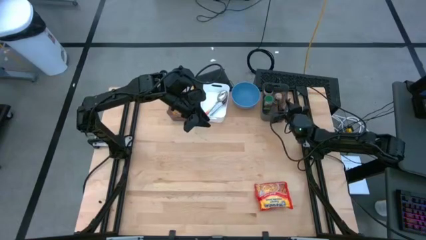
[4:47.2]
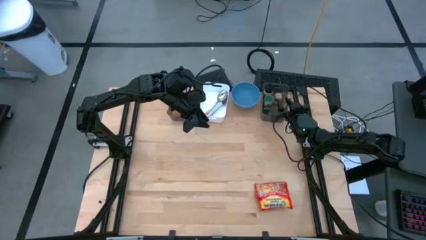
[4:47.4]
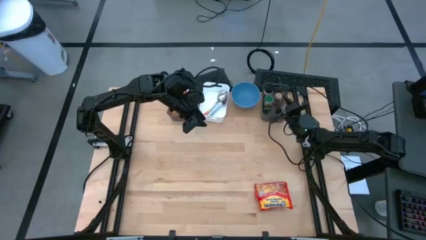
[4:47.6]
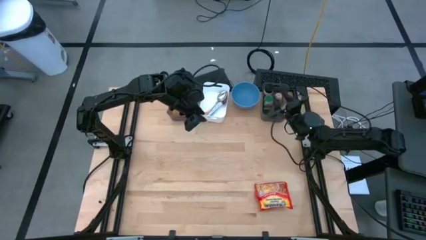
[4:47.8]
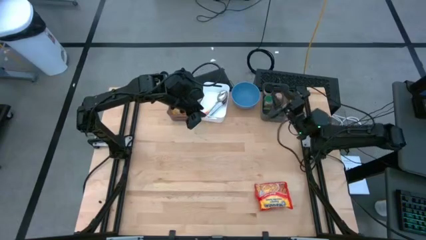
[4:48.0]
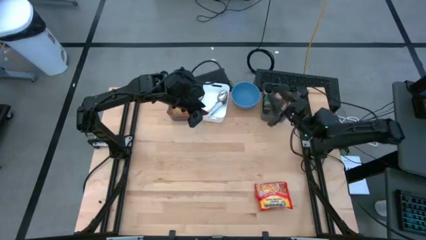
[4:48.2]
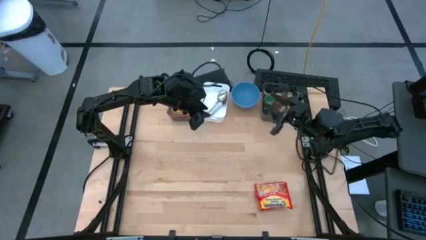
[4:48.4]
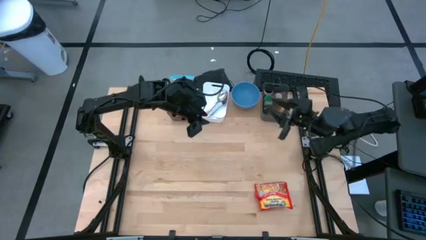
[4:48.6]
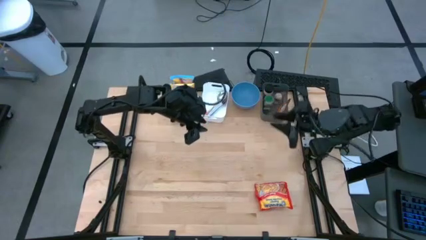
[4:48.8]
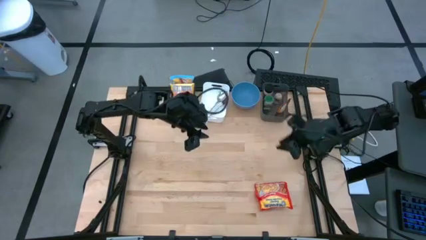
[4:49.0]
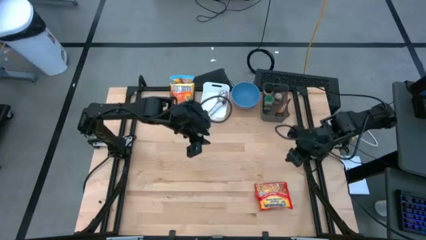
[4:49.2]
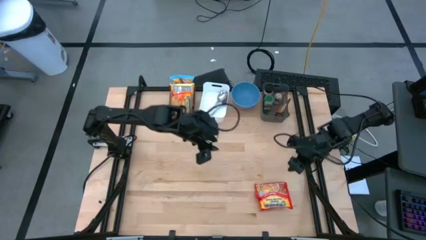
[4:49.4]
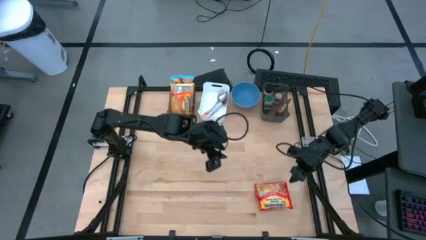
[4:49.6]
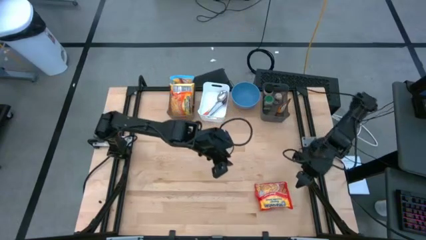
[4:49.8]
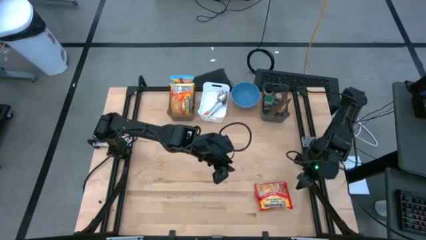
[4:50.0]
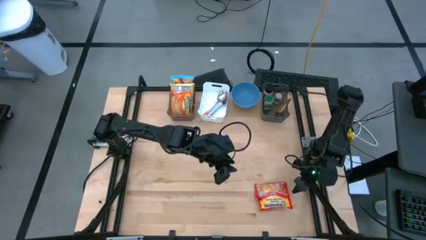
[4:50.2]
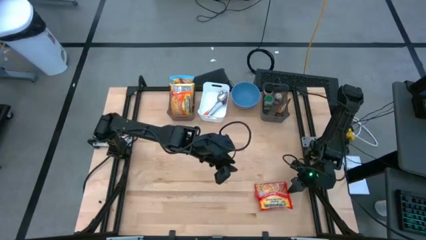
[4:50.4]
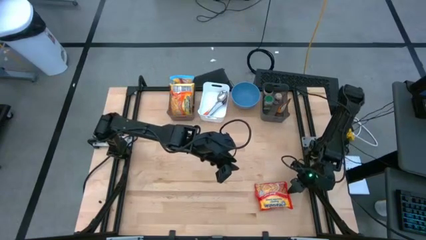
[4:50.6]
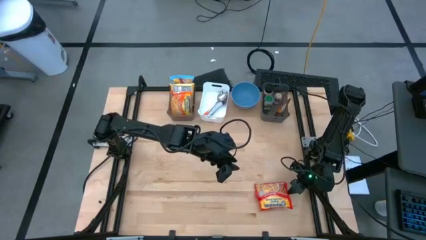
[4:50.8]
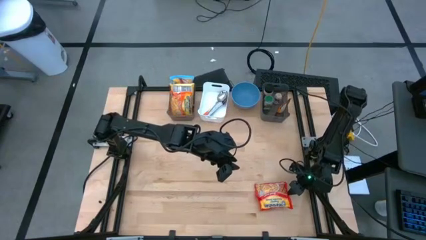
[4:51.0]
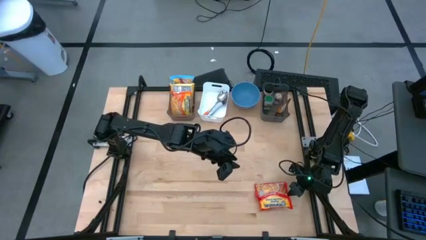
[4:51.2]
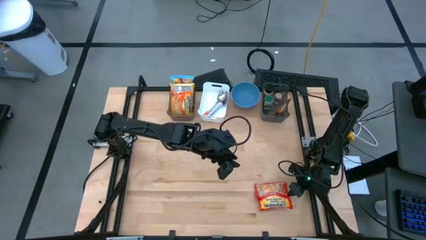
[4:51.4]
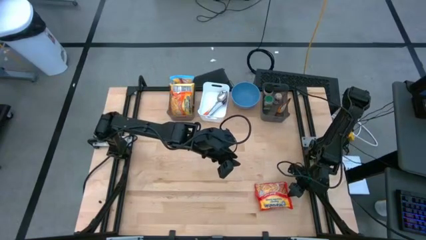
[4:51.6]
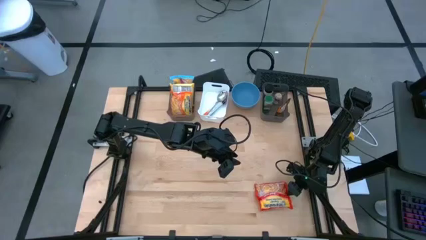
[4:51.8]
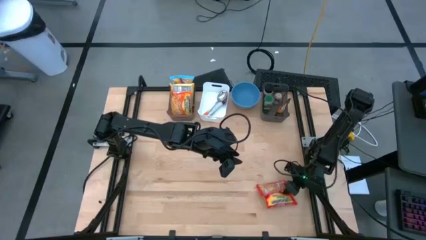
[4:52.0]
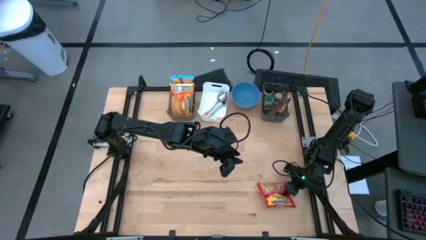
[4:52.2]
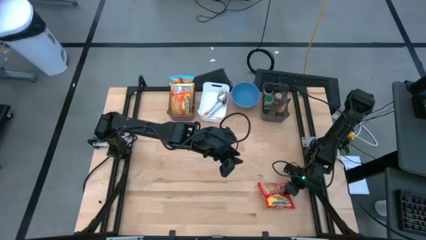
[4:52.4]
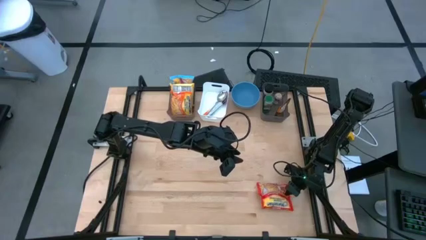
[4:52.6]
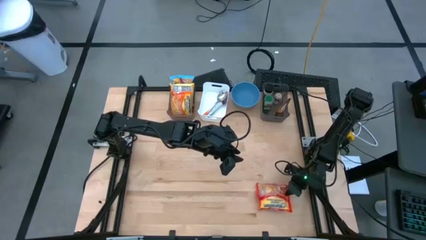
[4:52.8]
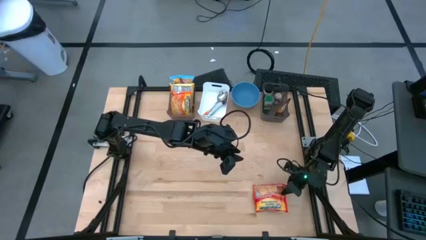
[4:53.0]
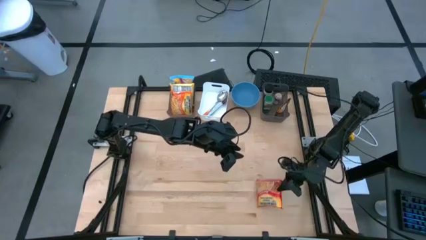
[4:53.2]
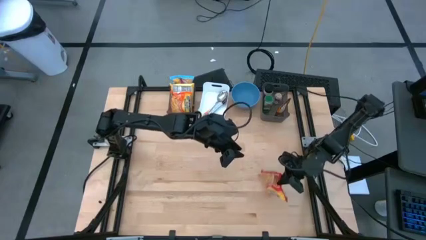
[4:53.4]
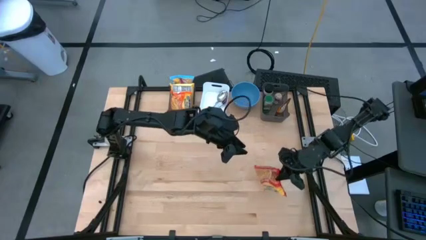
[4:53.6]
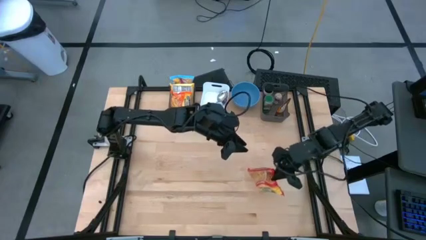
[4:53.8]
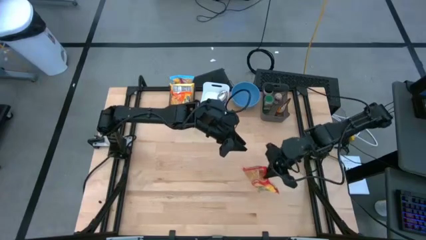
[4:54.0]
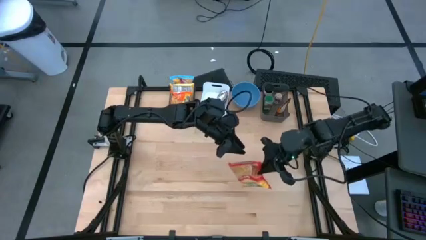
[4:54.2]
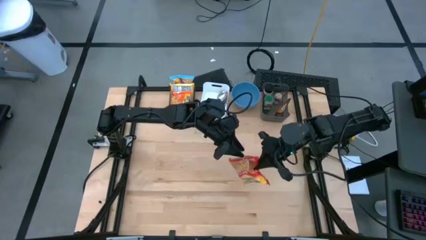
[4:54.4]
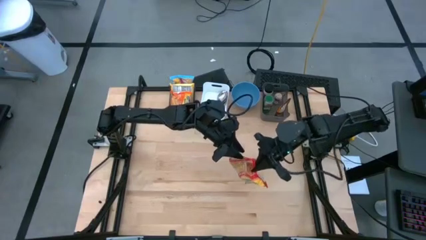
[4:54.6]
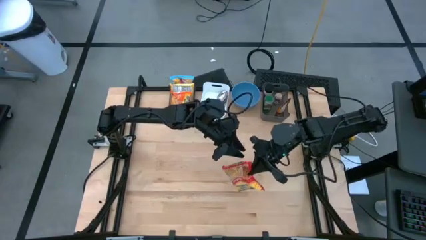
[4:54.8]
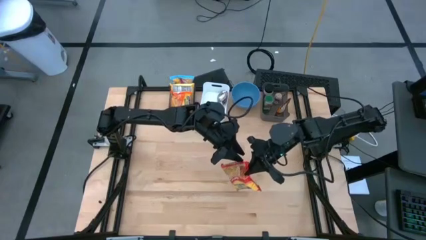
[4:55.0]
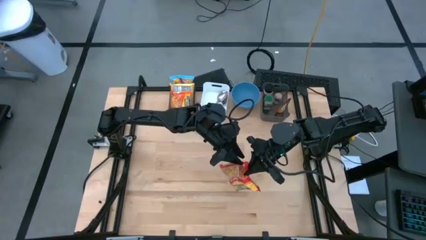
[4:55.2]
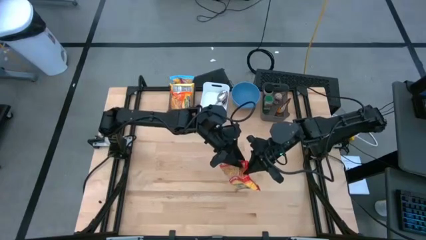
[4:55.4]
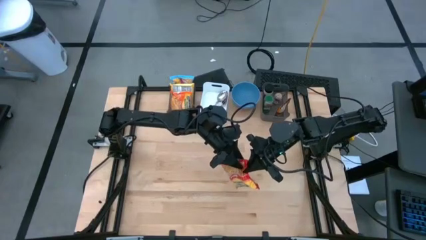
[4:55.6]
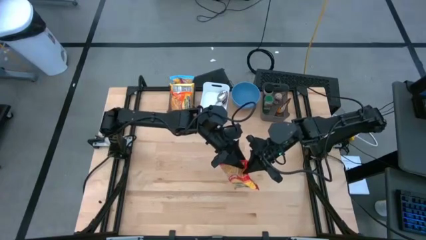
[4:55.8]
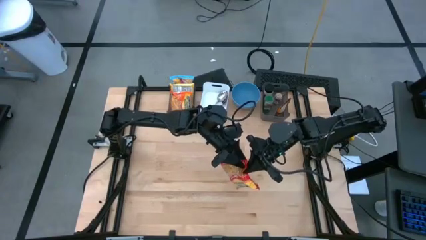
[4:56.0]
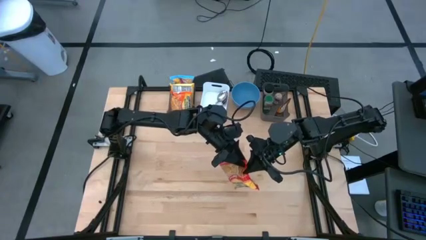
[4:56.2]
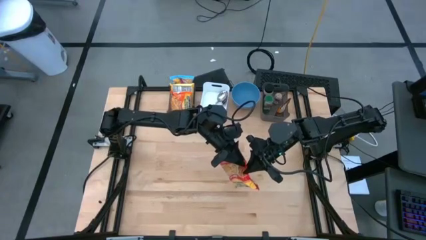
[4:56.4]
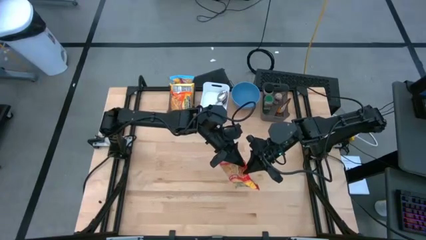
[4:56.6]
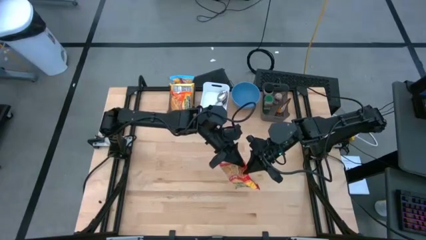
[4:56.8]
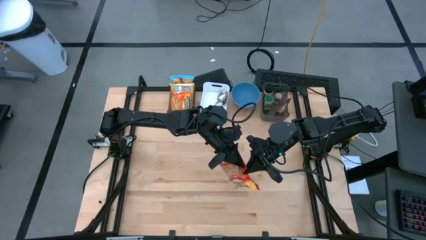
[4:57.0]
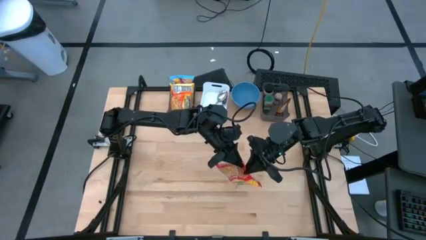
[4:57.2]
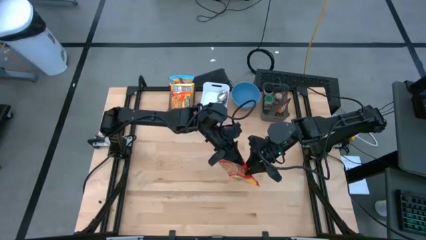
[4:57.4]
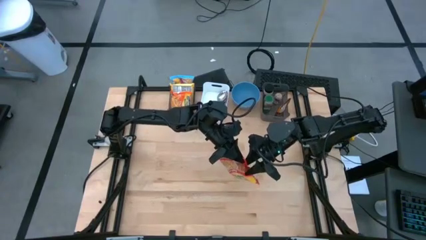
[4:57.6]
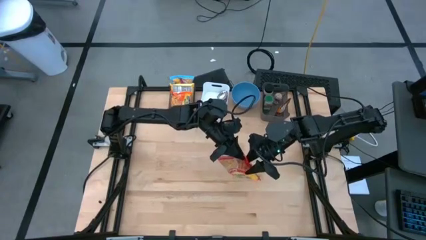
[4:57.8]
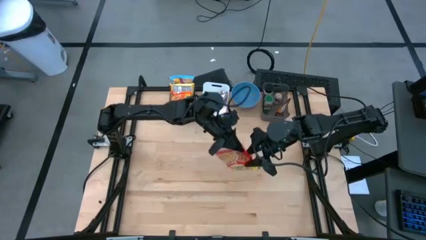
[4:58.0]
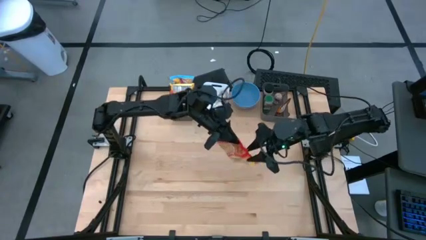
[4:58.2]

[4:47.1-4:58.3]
Task: Pick & Place Food Item
Put the red noodle pack into the left black bin

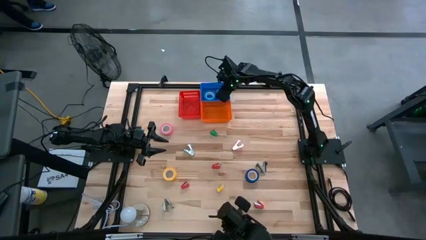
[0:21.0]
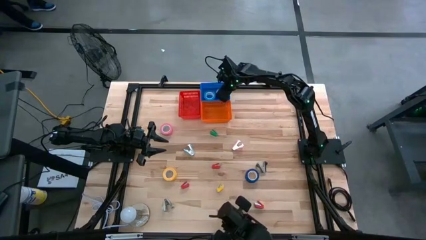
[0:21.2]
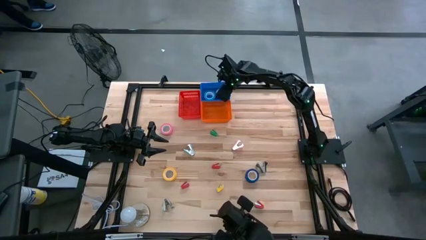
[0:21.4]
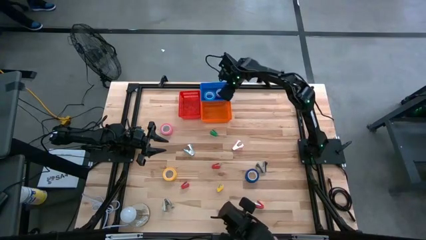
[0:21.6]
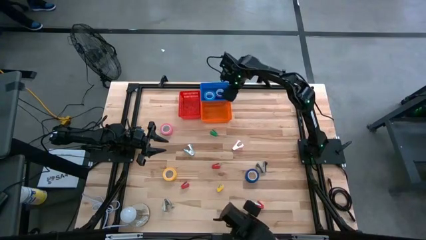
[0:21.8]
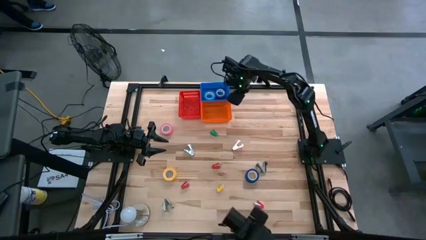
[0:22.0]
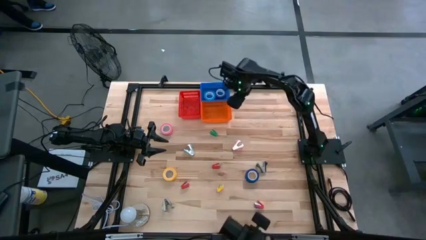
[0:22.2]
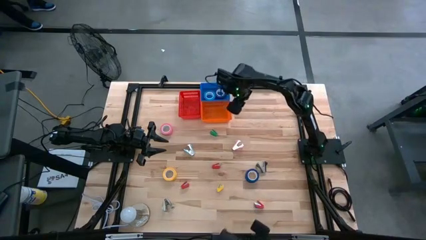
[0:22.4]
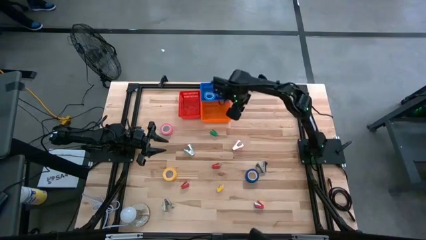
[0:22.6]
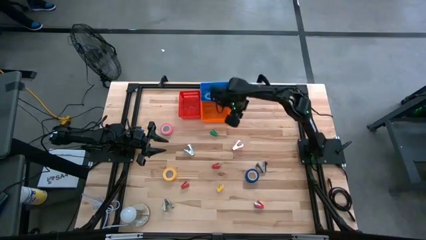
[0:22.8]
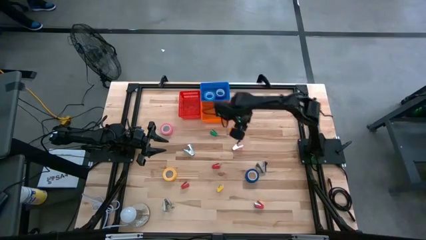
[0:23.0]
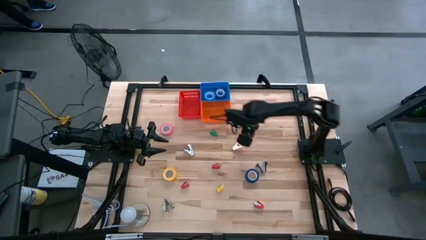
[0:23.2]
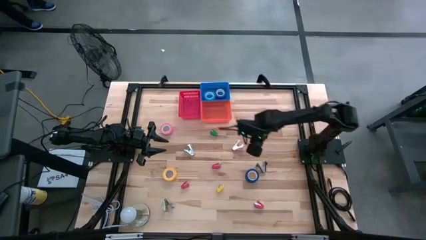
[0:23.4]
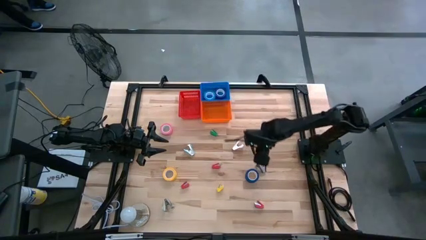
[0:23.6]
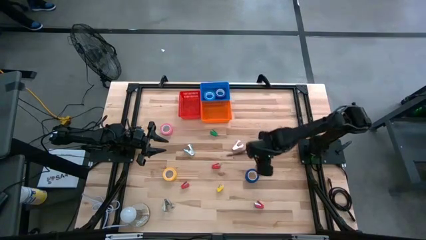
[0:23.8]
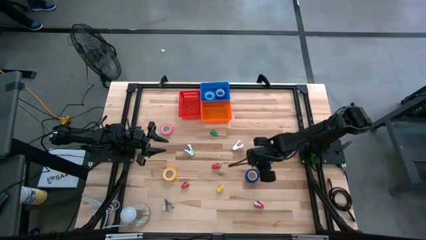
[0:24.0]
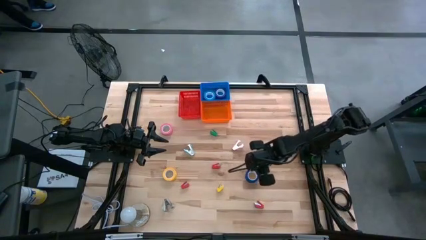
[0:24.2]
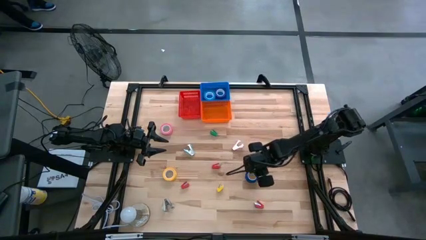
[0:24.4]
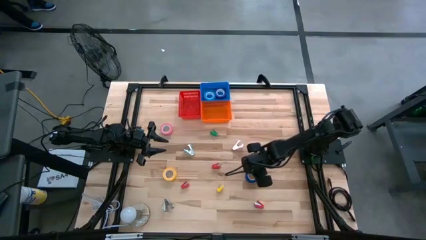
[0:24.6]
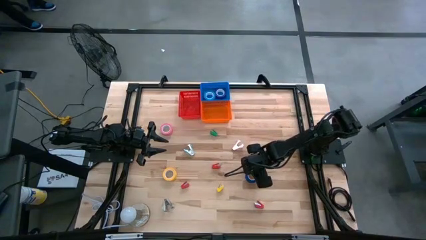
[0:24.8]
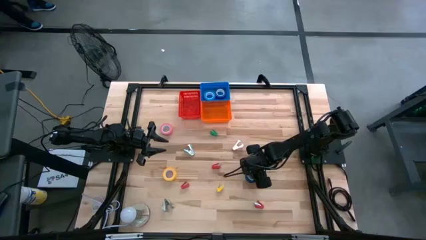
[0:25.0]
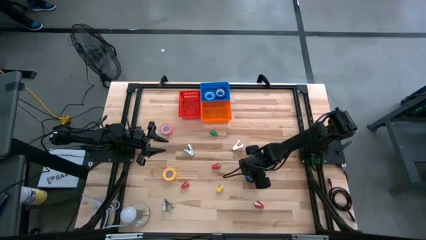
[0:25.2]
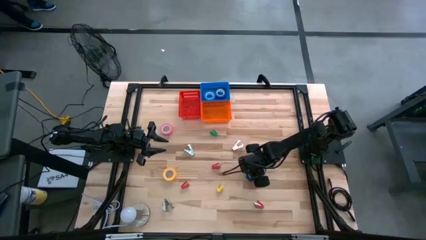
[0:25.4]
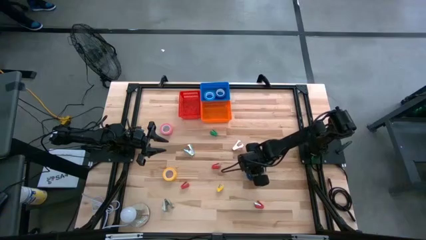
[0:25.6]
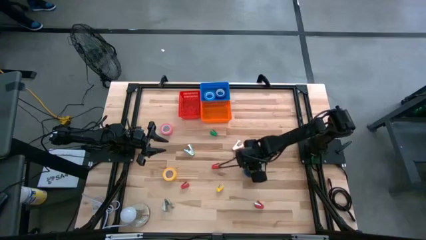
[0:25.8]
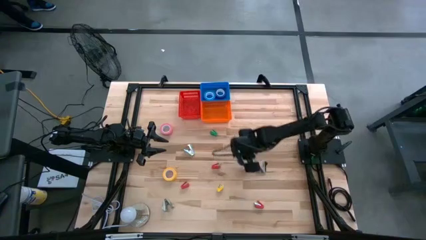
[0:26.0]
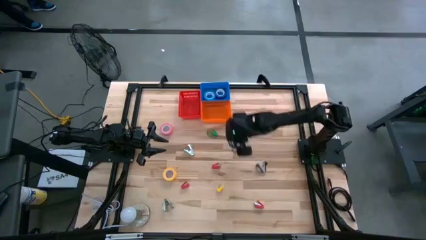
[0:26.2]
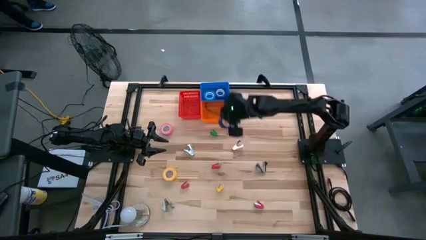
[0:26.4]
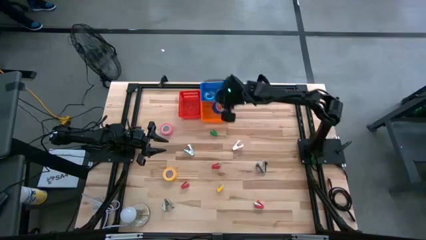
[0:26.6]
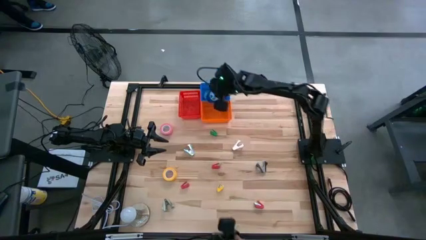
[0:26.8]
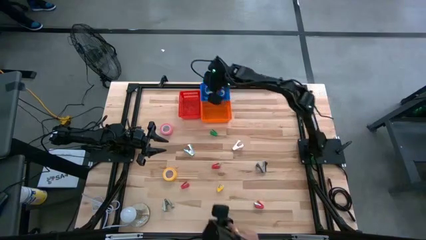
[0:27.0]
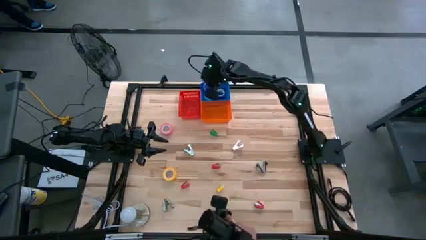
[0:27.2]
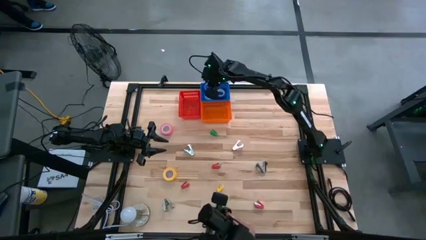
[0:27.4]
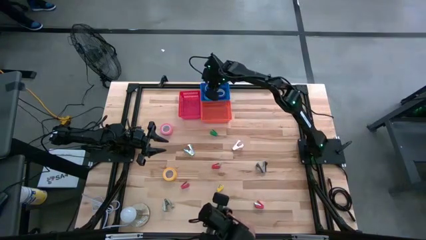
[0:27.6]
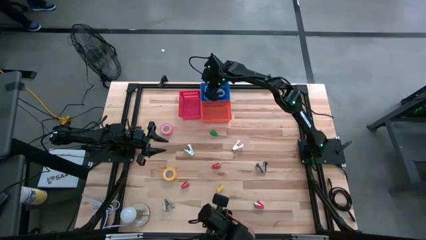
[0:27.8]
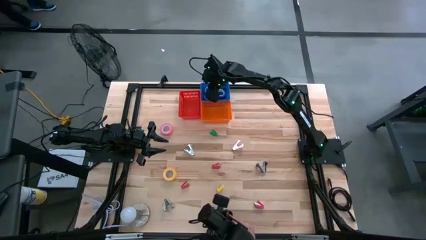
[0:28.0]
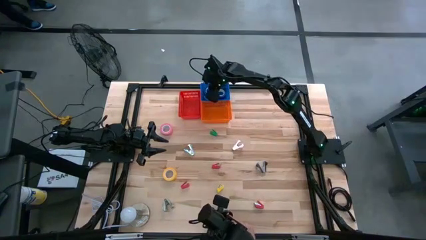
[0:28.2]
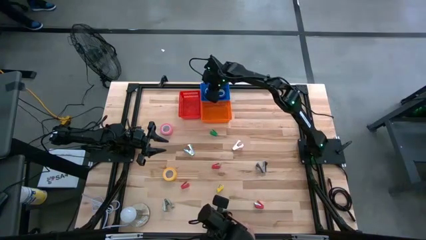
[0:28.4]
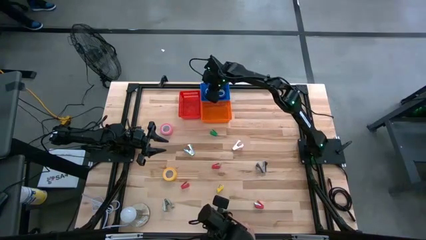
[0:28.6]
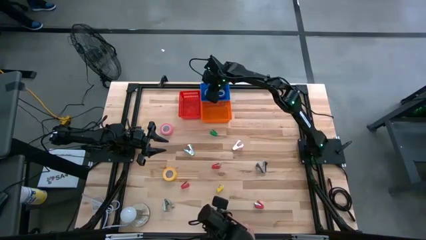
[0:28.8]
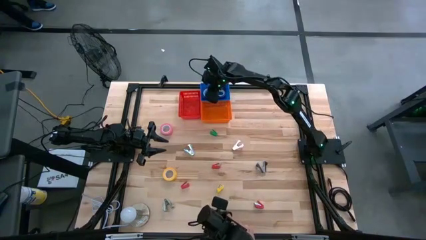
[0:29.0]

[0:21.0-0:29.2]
Task: Pick and place Stapler, Stapler remover, tape
Put the blue tape into the blue bin
